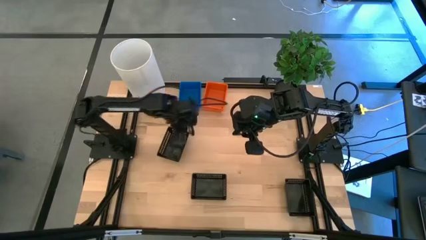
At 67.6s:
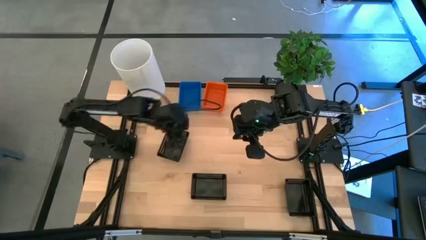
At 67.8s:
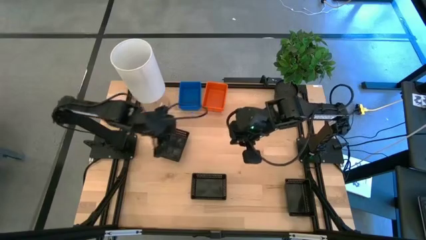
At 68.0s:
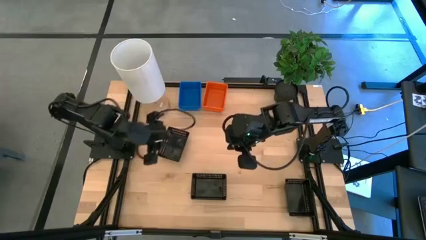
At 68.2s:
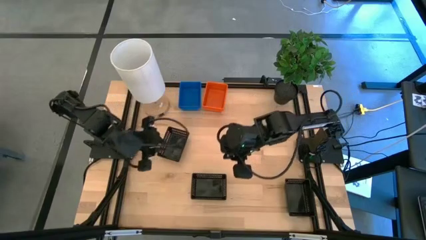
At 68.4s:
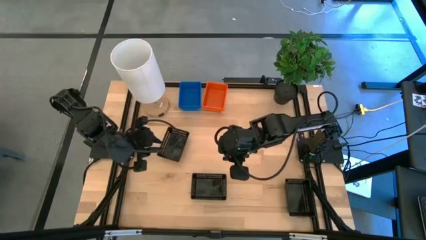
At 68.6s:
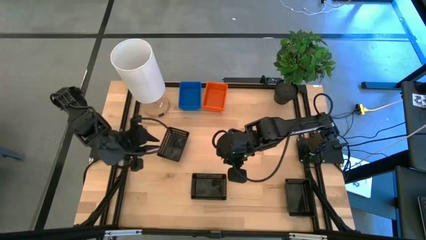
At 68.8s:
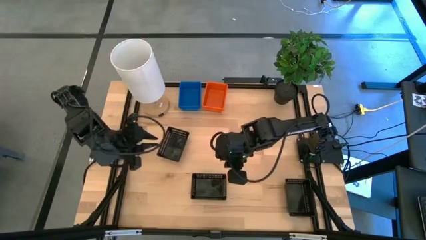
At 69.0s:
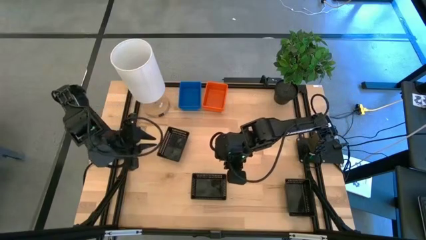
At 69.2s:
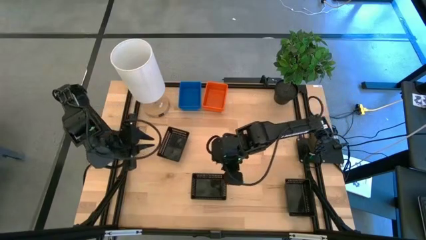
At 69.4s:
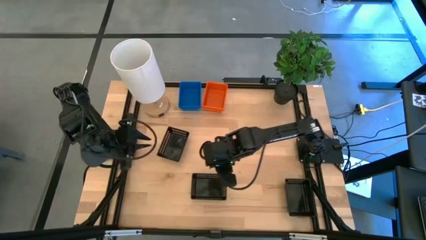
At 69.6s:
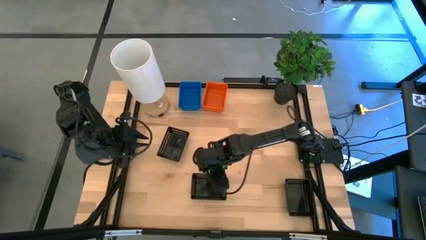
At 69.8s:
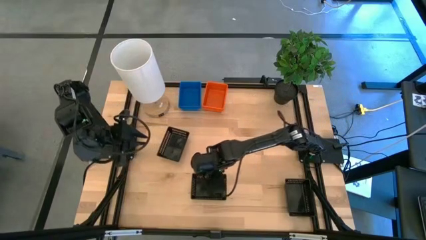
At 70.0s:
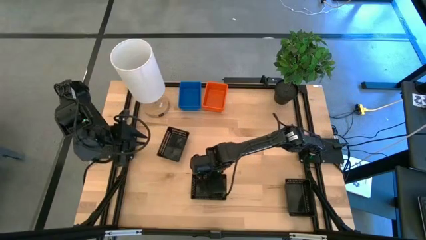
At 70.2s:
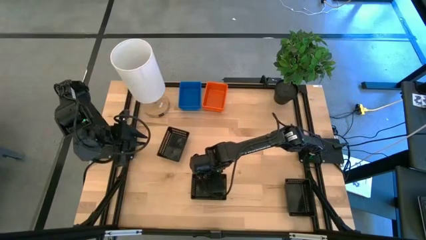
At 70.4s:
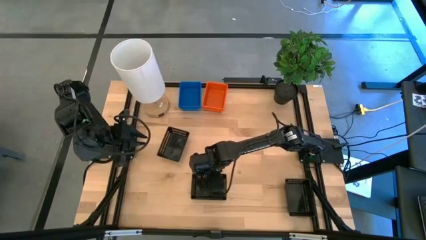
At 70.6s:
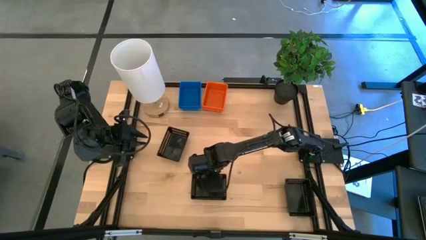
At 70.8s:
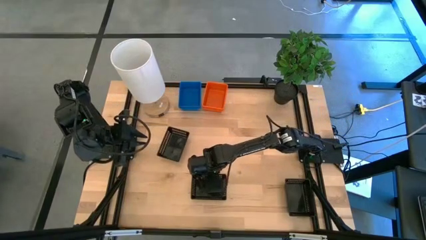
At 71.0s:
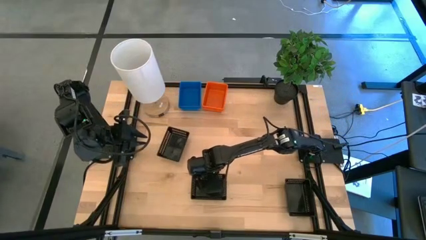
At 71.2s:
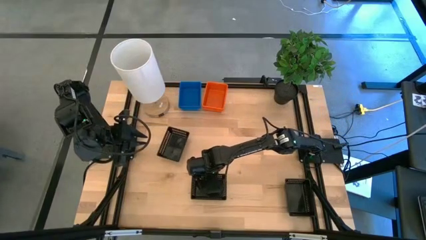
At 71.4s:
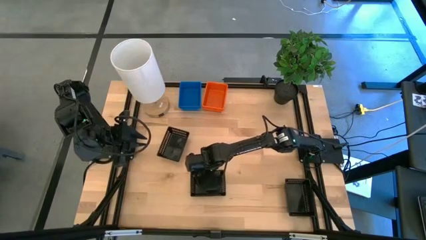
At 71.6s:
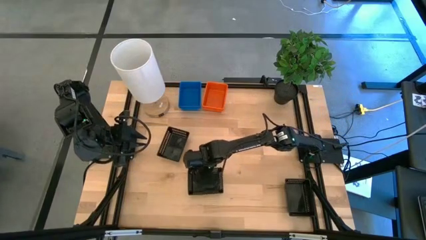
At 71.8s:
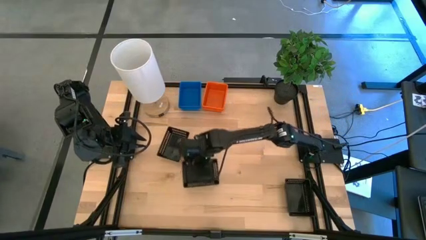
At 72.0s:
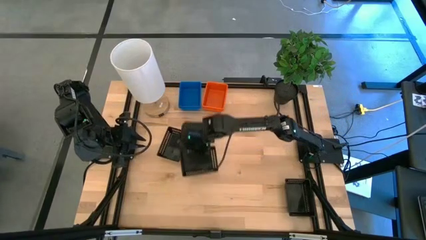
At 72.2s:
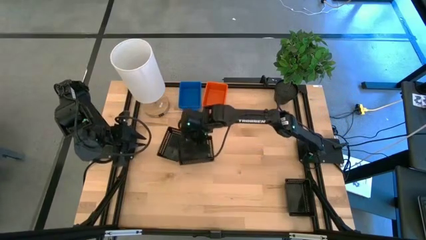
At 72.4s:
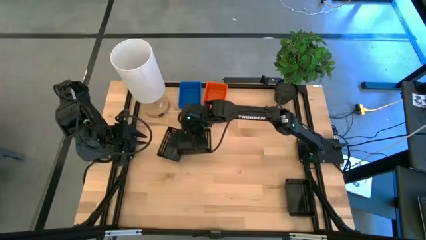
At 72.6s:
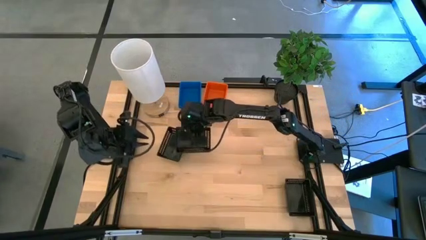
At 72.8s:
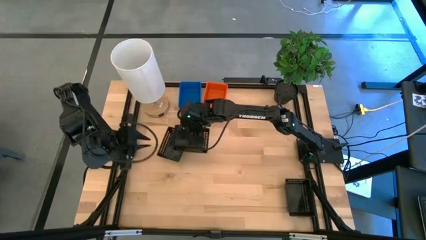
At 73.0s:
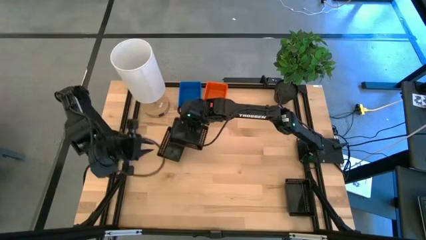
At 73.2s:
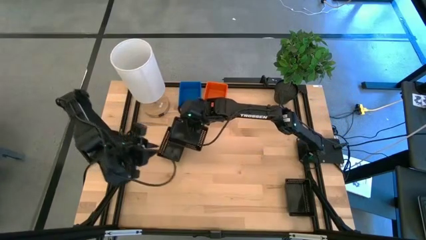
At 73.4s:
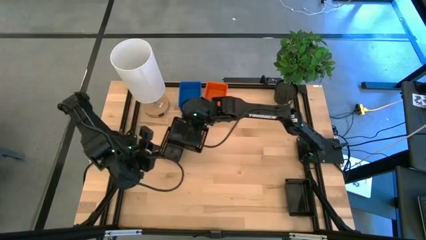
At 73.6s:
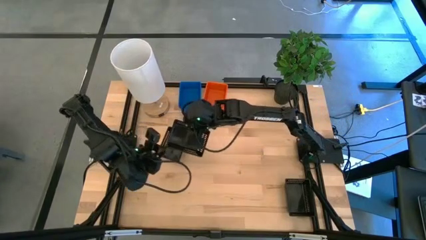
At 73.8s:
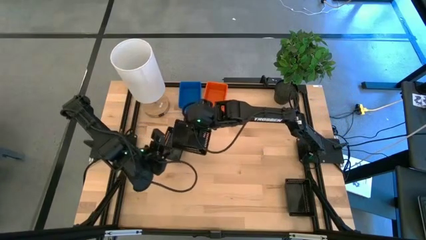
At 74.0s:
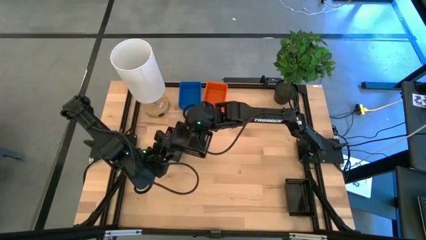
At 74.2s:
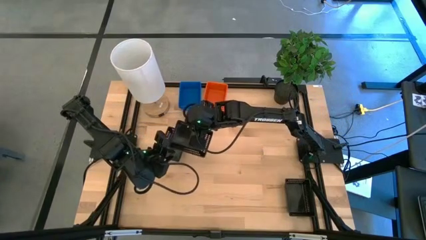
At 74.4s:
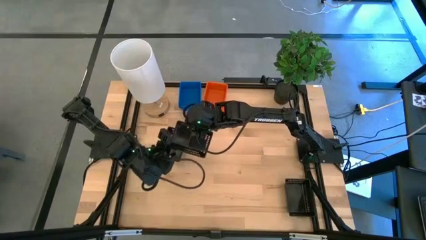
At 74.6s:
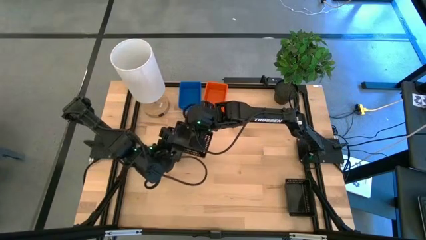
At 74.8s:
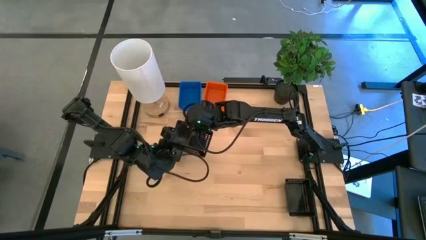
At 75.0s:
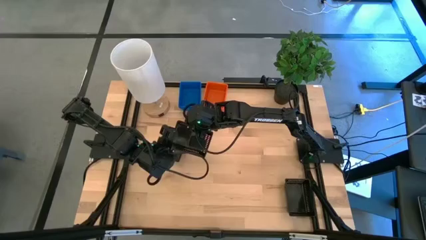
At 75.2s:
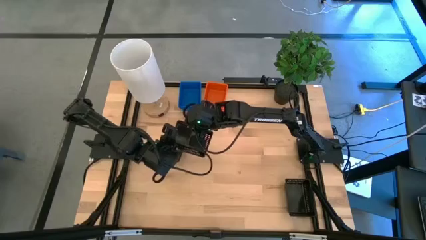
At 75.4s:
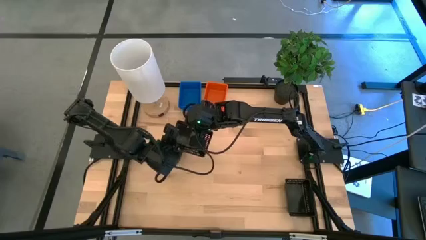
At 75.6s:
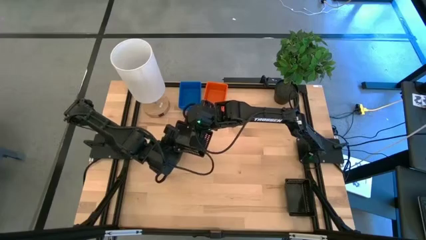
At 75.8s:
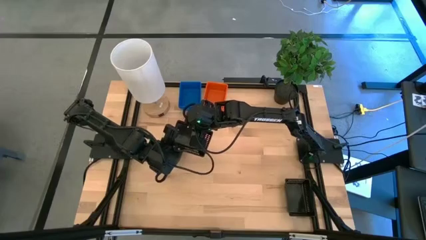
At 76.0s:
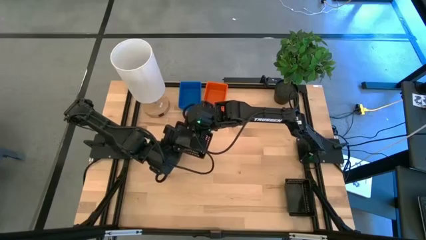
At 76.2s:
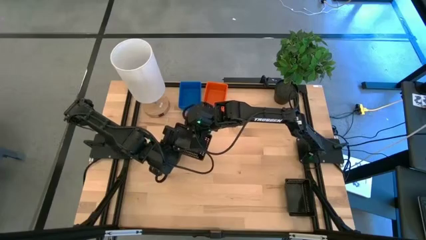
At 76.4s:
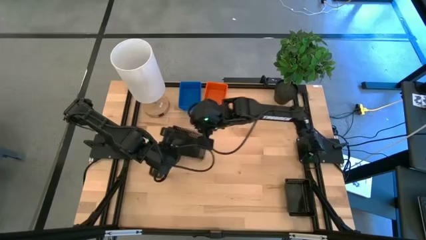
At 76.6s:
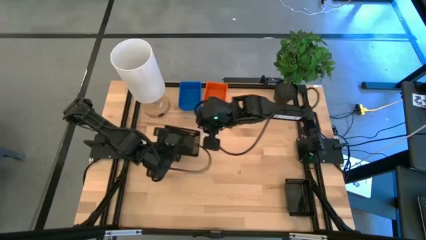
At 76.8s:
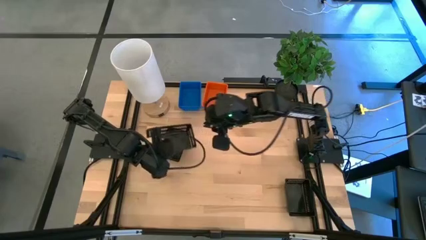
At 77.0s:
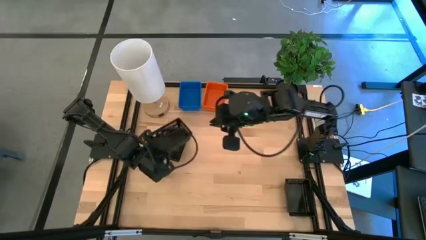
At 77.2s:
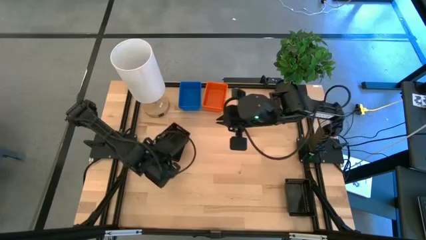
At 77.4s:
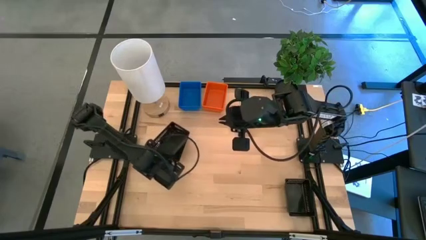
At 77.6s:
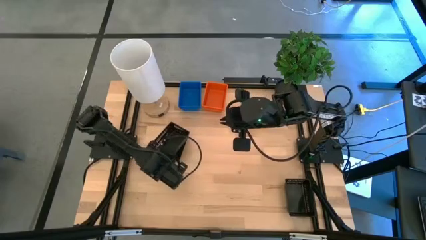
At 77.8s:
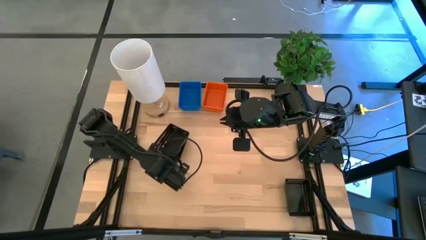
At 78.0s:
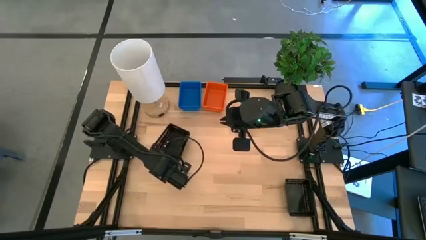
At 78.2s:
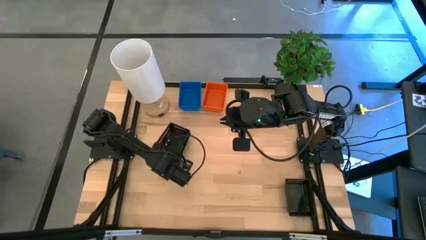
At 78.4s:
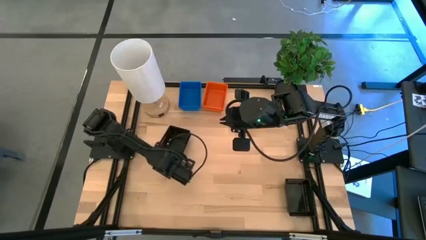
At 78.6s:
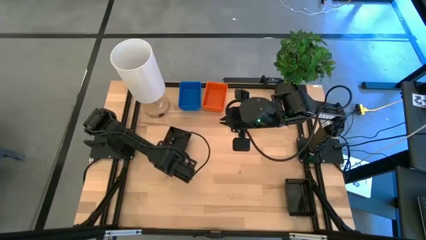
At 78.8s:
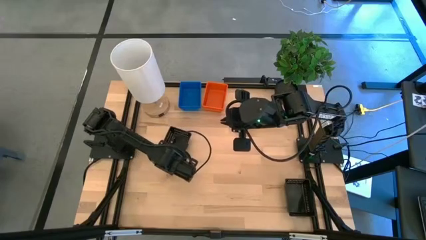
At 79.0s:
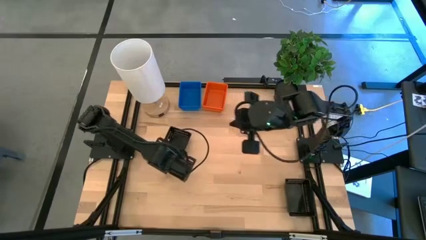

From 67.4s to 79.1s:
Stack the bottom black basket on top of the black basket on the table

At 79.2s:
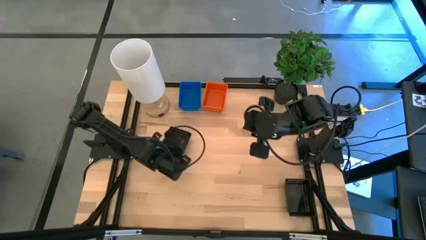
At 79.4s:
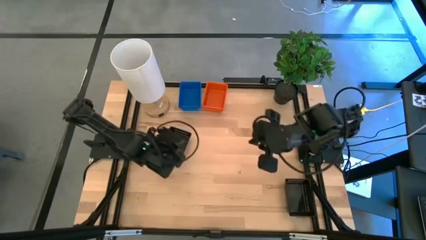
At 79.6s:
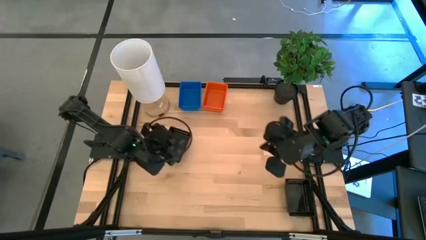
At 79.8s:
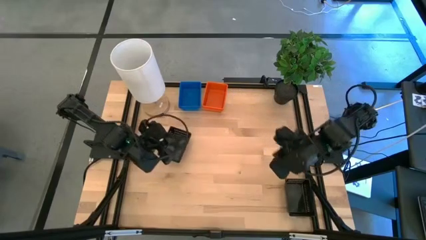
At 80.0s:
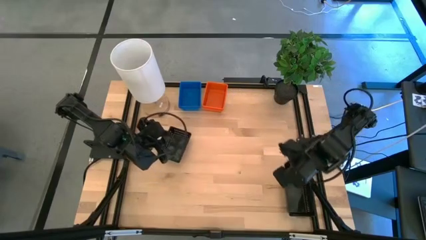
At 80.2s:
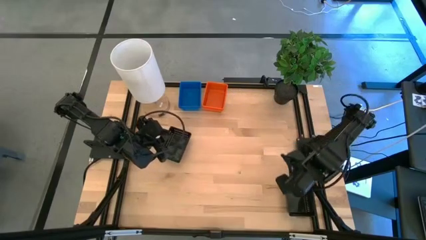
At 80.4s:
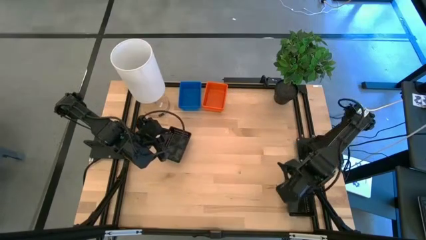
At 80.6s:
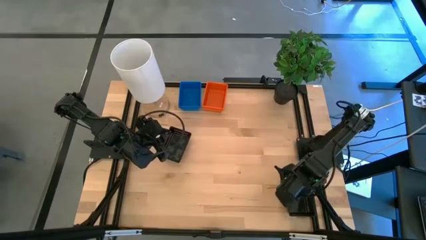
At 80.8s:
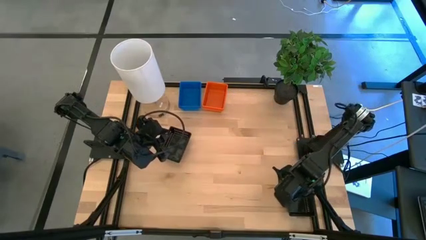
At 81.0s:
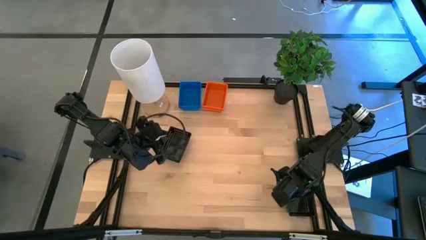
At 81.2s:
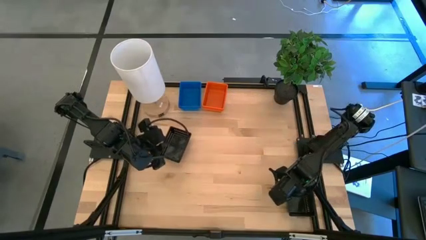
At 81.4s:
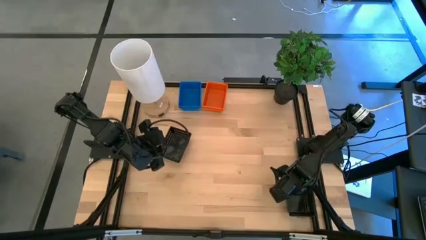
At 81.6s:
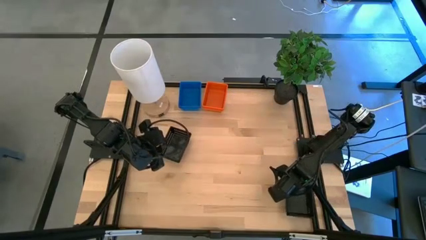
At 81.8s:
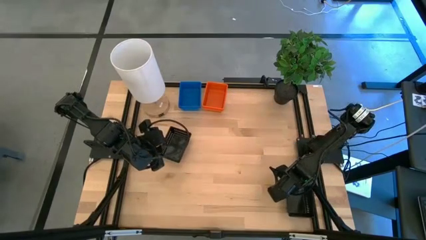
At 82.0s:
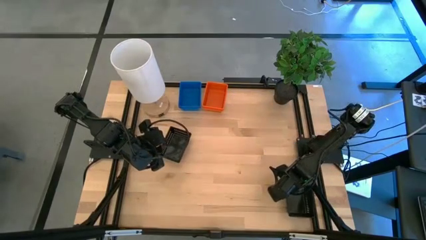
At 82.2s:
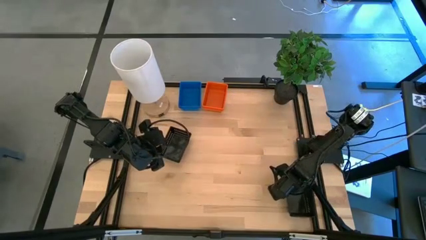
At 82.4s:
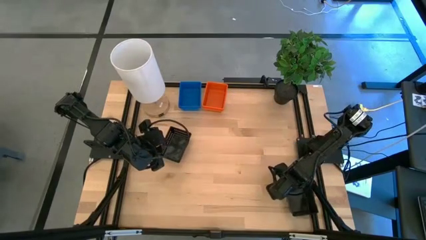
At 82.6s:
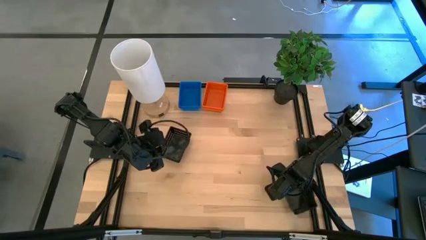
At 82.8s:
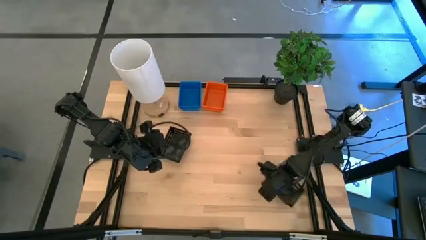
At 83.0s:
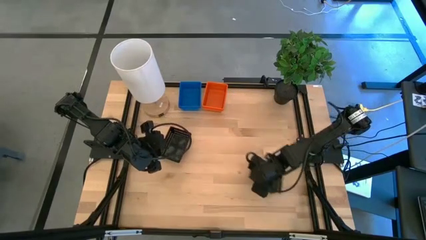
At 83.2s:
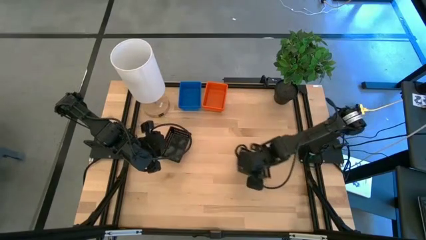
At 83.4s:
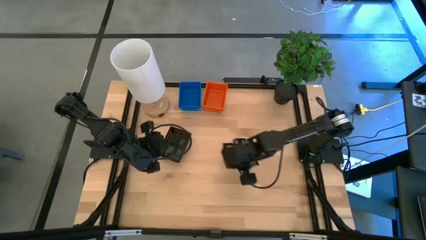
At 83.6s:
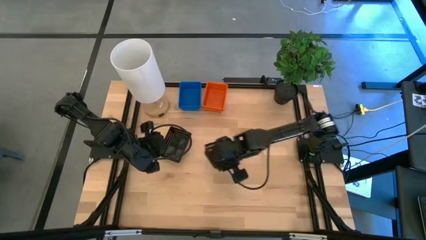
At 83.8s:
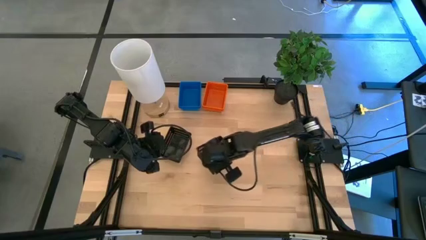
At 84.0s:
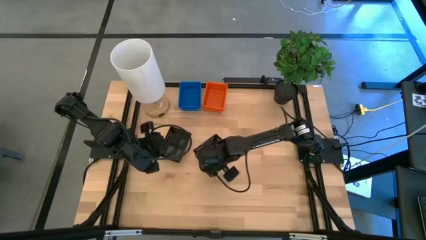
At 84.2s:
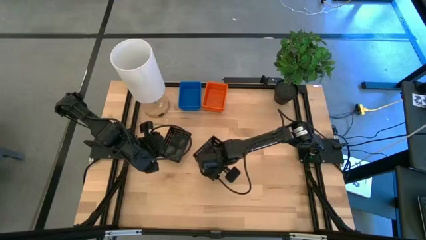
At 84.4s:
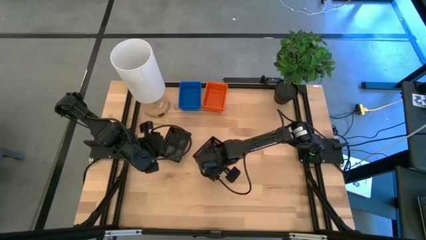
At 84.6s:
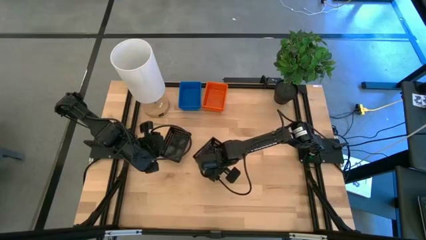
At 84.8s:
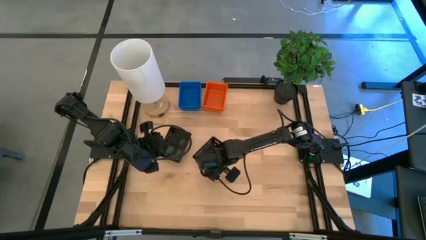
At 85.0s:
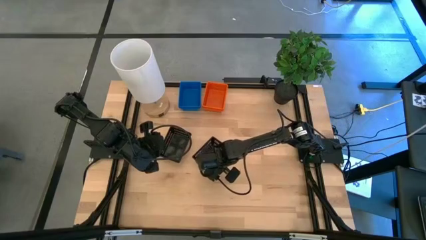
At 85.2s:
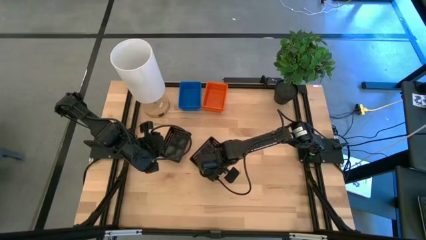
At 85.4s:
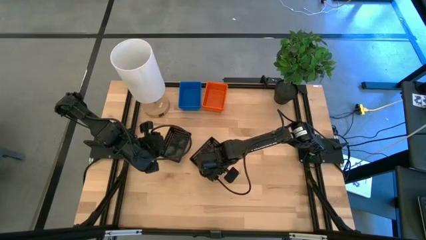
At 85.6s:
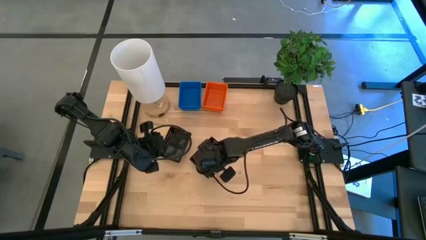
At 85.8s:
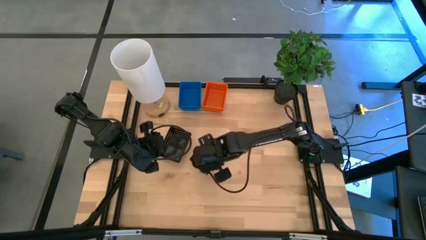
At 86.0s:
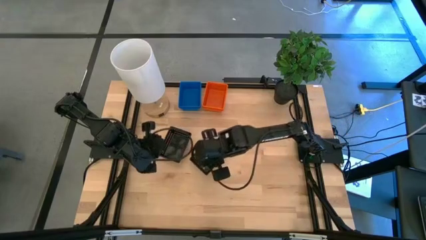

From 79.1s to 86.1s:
Move the black basket to the of the table
